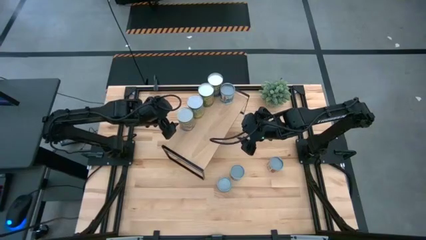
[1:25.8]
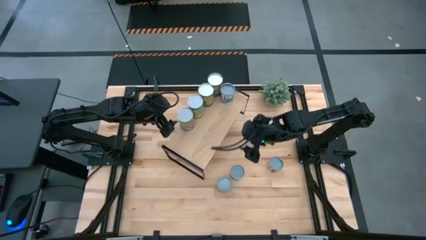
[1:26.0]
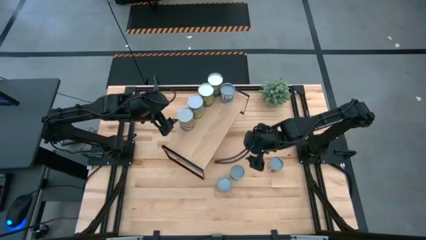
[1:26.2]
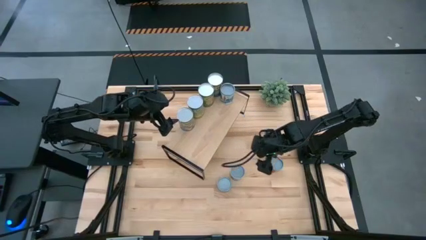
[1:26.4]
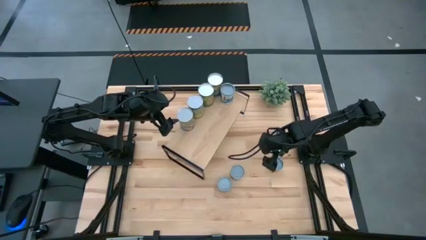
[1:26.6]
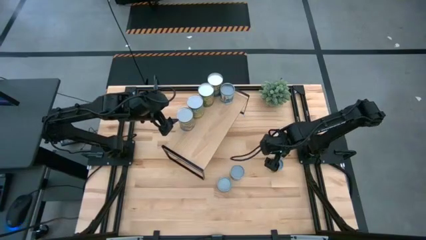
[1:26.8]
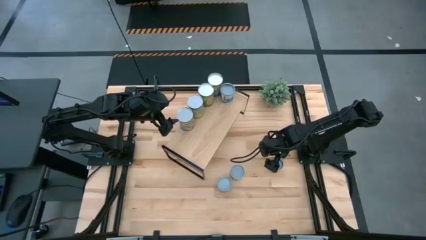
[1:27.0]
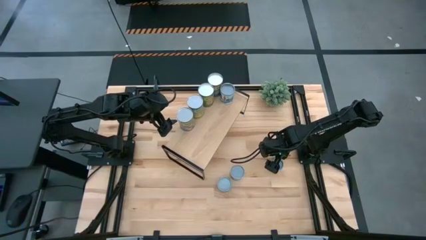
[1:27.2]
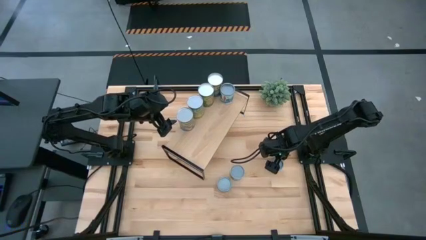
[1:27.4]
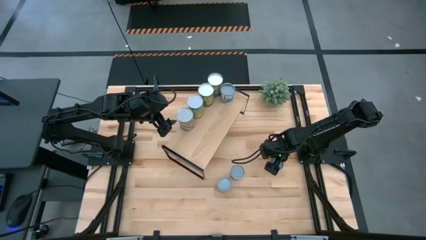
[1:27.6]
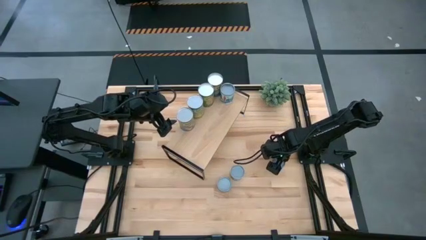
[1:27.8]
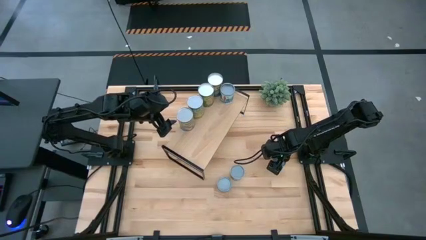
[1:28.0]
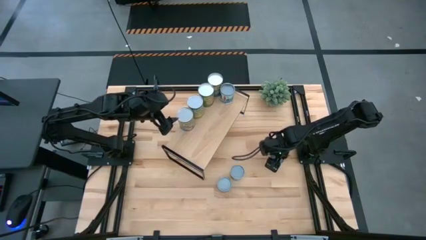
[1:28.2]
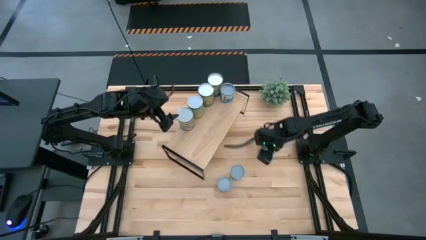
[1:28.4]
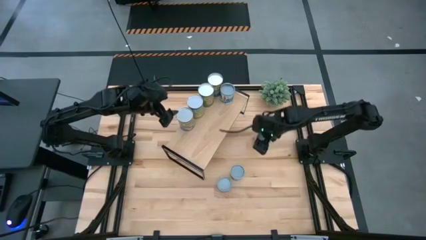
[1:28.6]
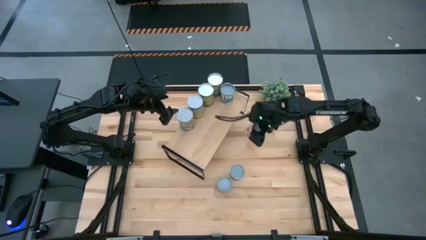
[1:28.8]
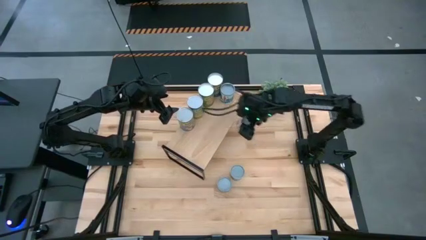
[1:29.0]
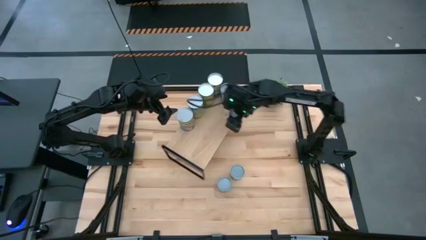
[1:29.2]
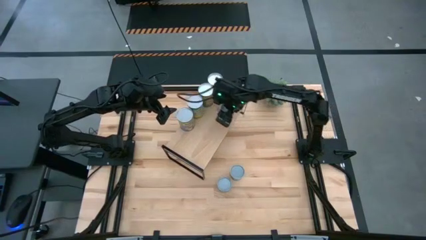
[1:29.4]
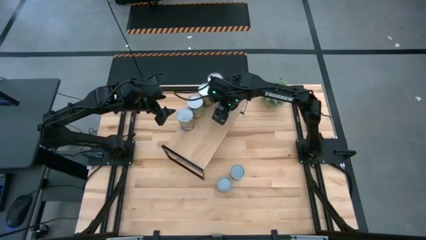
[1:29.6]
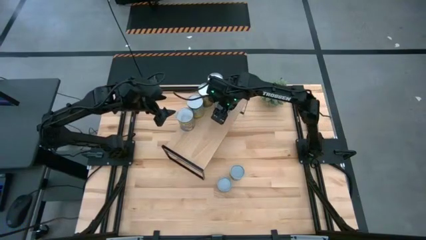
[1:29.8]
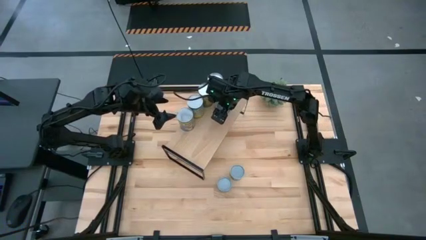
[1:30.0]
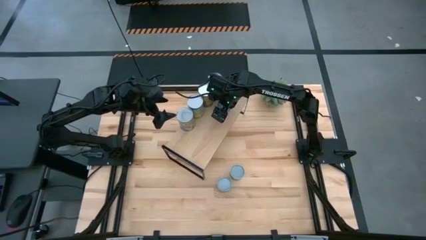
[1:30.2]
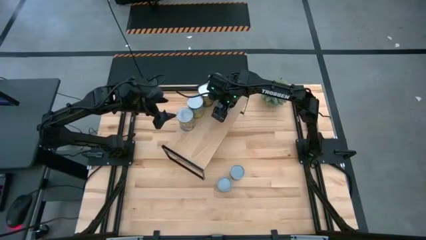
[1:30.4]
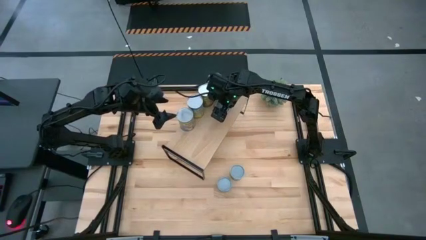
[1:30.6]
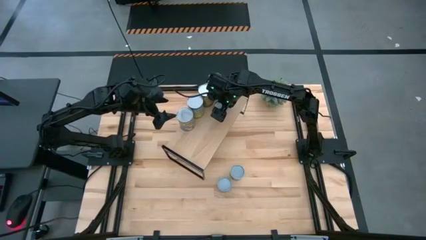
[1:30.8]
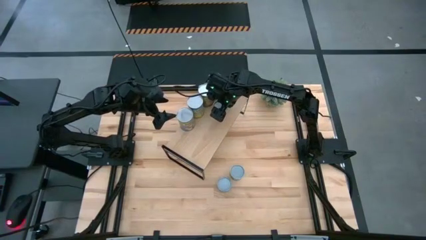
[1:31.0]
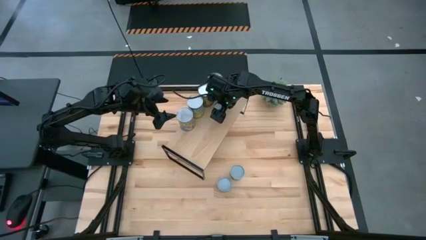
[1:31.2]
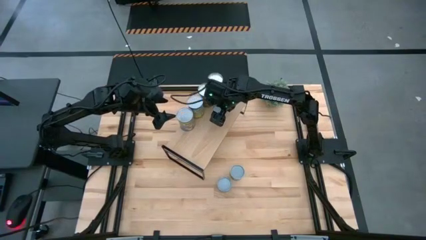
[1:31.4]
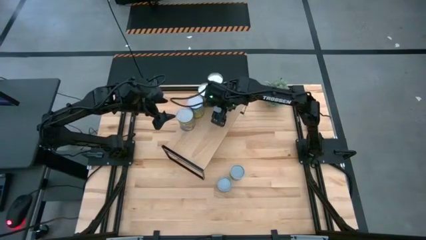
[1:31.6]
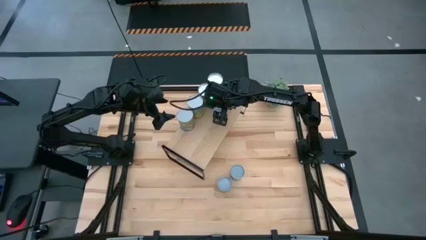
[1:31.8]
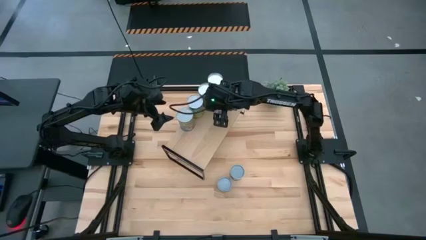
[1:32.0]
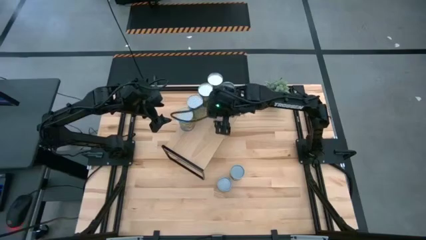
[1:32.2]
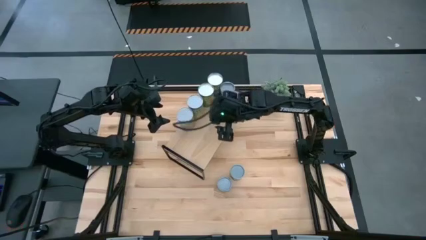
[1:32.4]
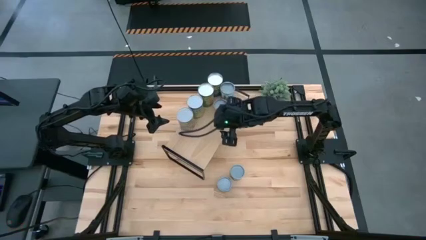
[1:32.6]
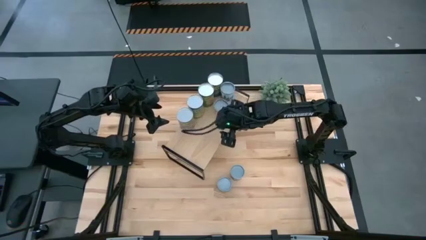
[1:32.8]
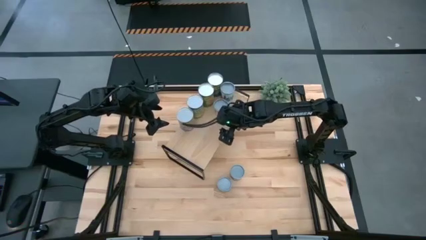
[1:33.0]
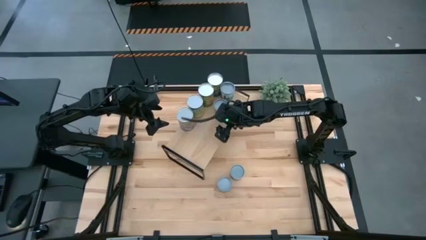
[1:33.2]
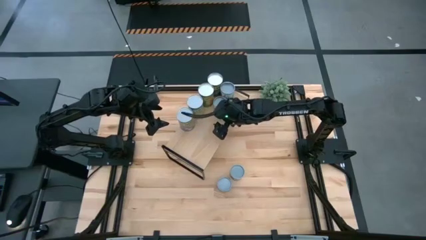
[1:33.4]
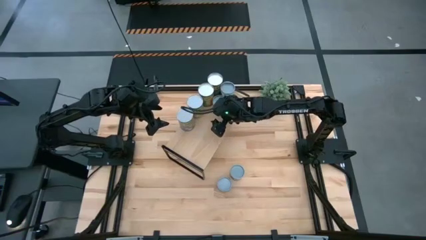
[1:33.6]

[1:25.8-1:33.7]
Task: Pick and place cans onto a shelf
Put the canned tomatoes on the shelf

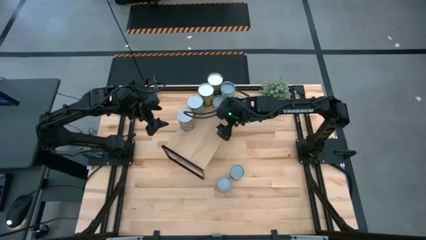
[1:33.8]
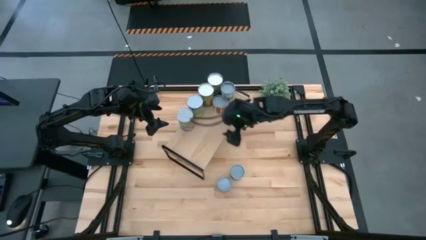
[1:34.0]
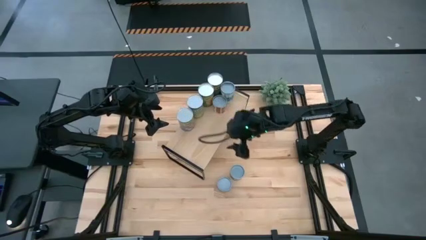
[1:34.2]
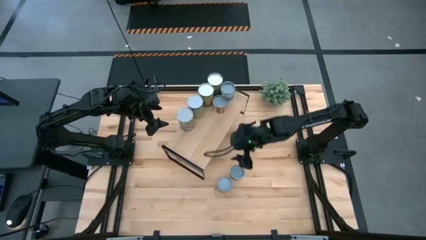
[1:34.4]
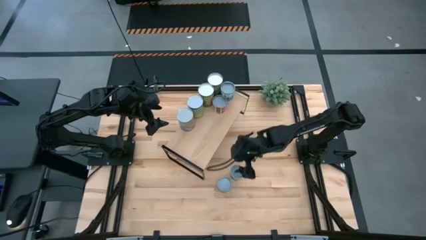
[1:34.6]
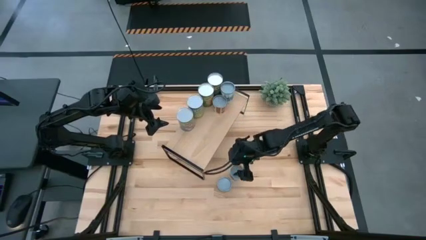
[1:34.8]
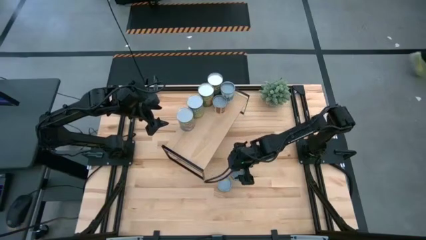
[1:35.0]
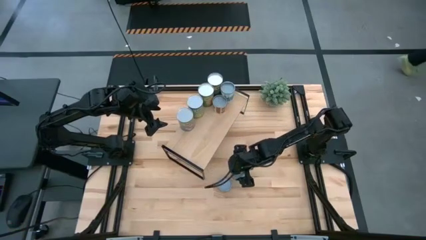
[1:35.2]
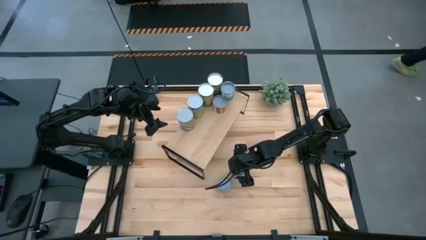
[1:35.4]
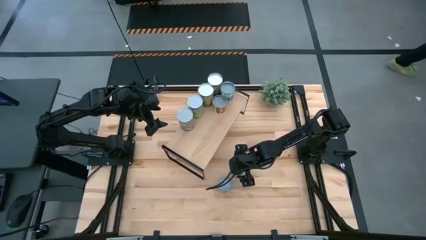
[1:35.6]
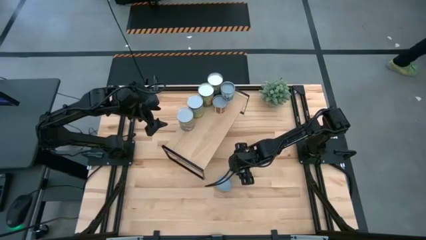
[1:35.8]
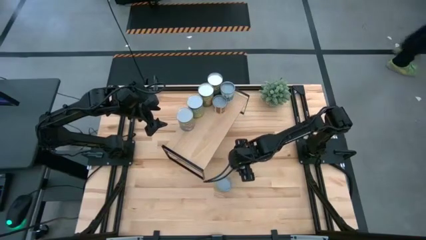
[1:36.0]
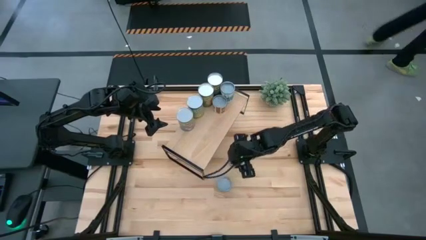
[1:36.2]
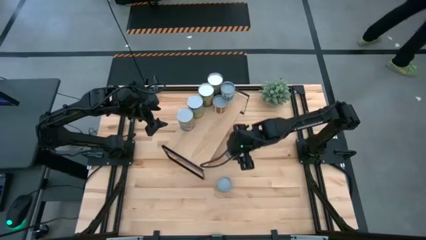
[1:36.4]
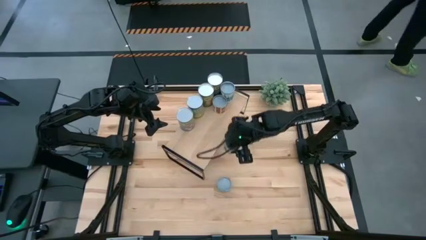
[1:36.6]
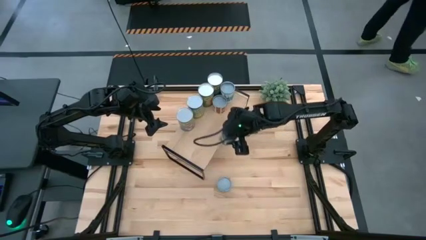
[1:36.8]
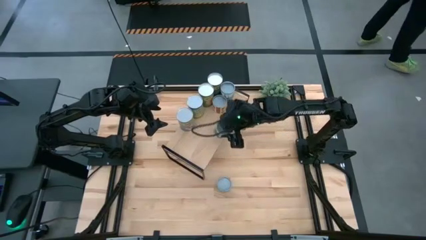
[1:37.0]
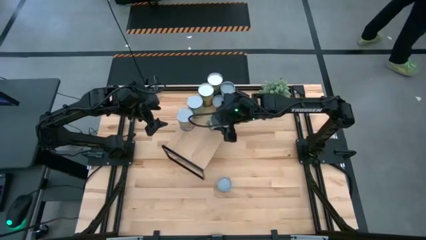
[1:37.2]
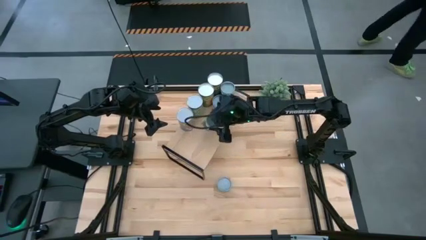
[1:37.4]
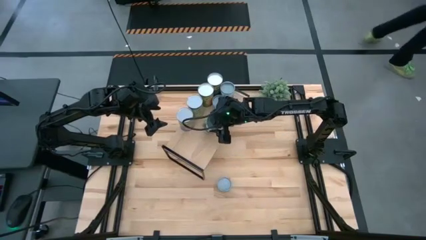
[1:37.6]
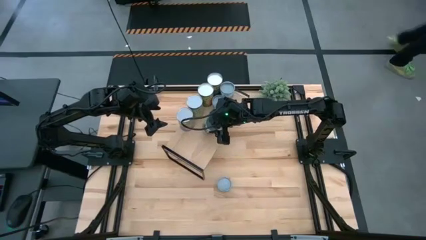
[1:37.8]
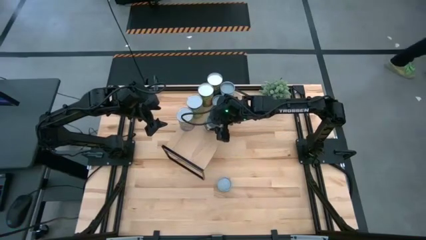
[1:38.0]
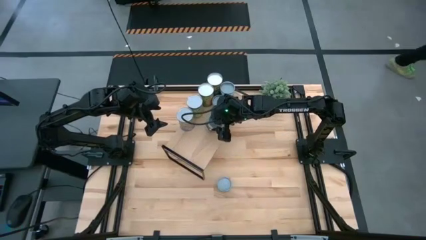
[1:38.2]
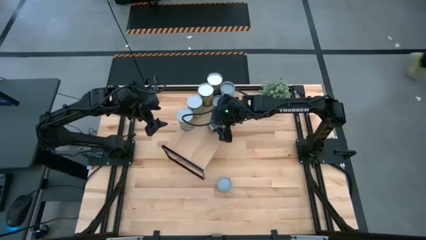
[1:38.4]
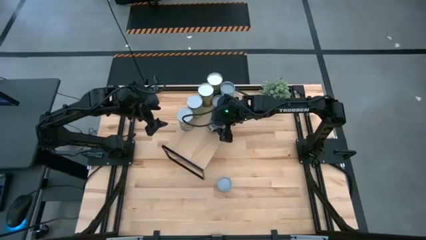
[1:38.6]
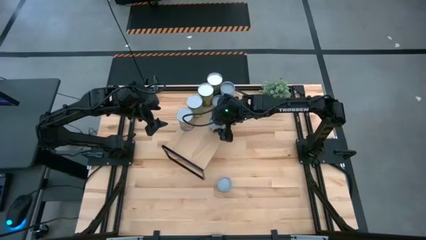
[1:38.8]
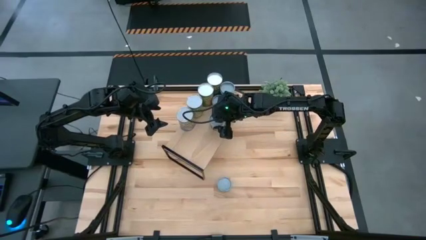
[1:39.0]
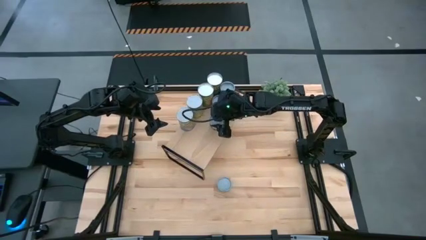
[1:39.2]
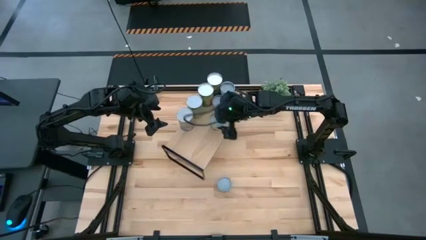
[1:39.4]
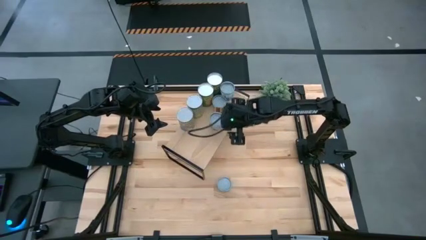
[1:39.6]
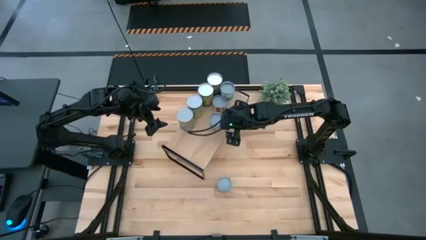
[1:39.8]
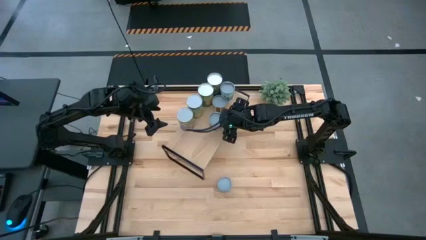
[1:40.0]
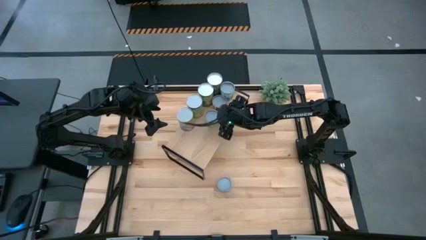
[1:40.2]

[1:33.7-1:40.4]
Put the canned green peas on the shelf

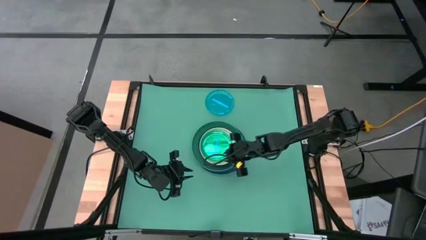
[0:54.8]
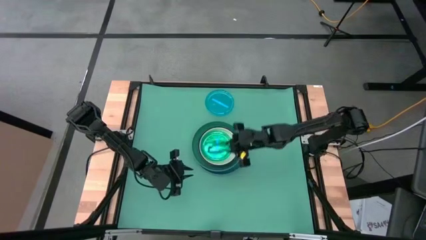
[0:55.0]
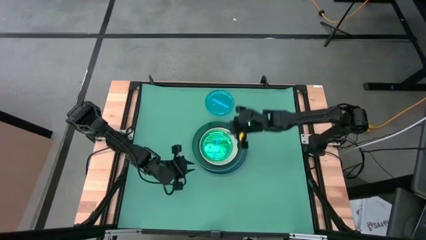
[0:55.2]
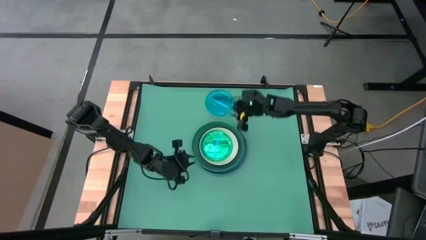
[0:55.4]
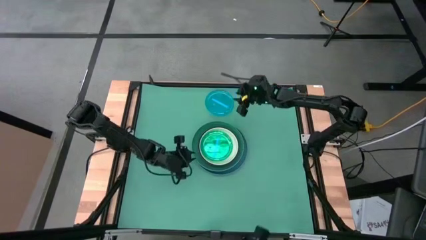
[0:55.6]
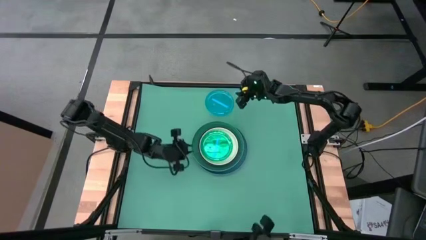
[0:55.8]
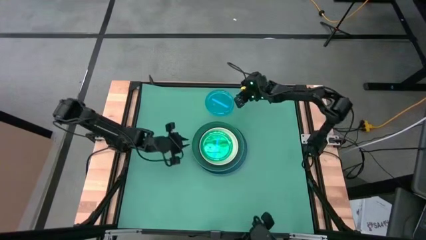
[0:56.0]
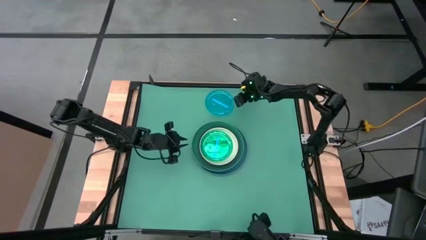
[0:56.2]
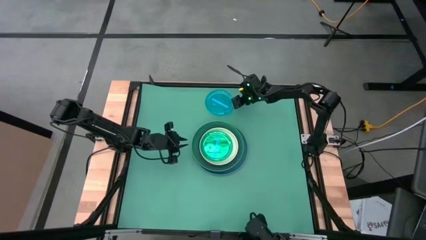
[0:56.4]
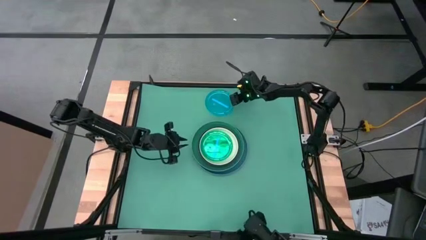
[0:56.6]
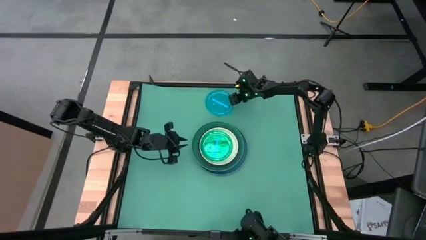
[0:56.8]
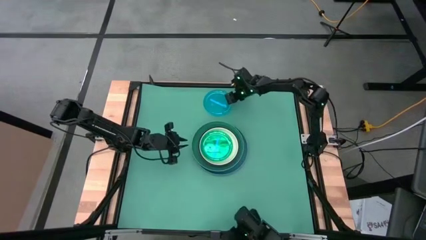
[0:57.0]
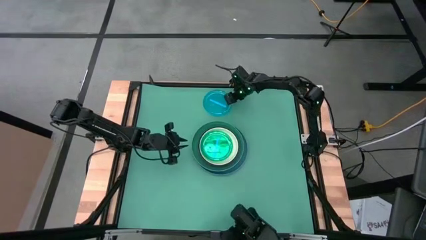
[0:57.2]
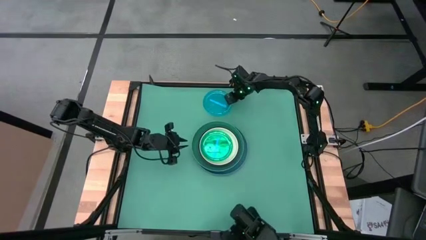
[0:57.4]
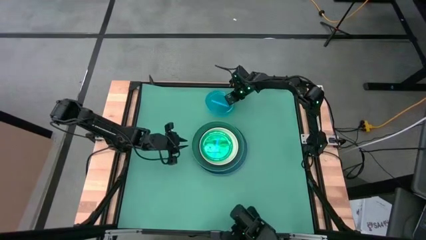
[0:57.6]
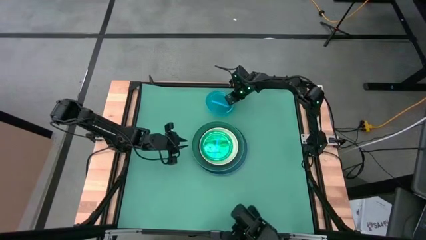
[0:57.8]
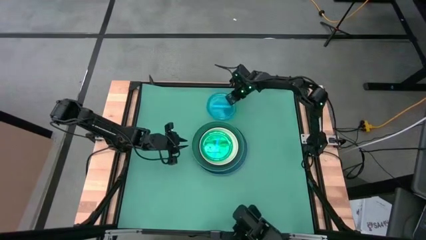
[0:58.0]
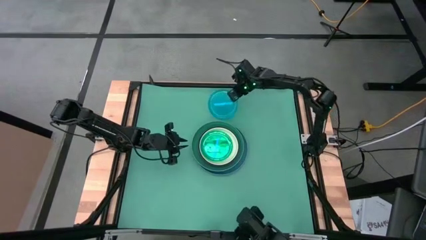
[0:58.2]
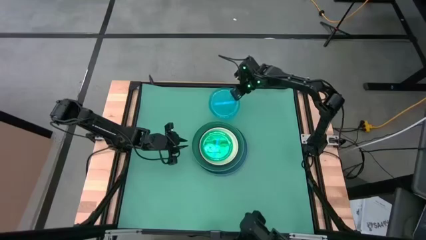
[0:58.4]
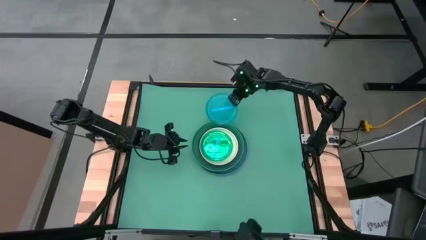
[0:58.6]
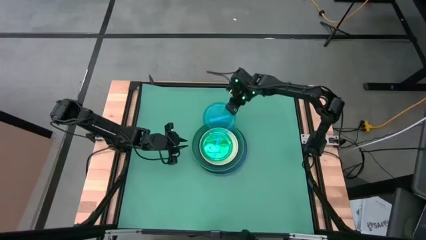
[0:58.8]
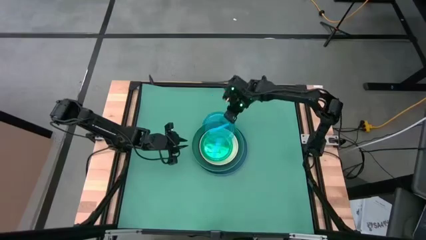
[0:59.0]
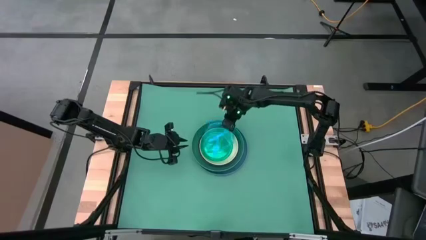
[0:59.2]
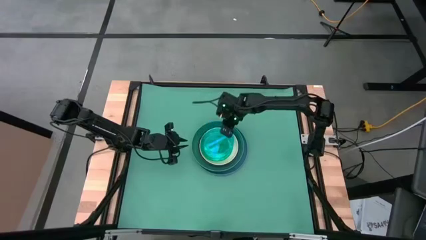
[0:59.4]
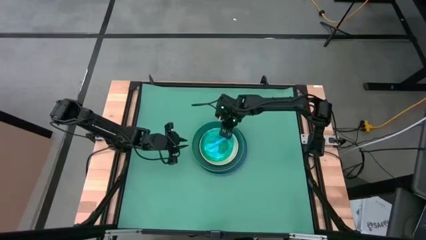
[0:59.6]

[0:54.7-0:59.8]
Task: Stack plastic plates
Stack the blue plate on top of the blue plate
